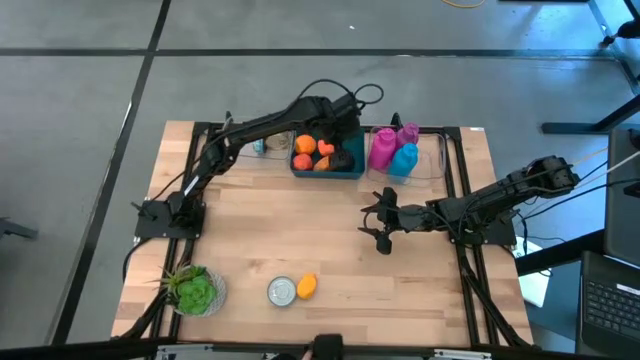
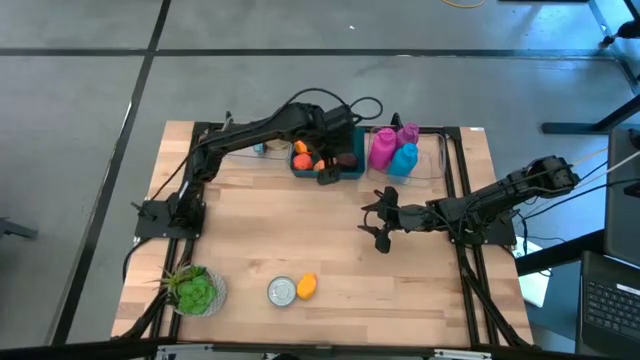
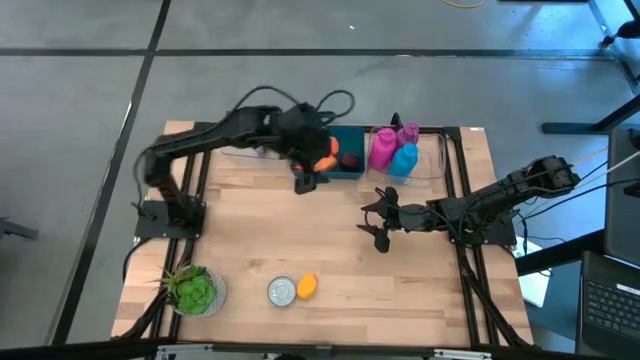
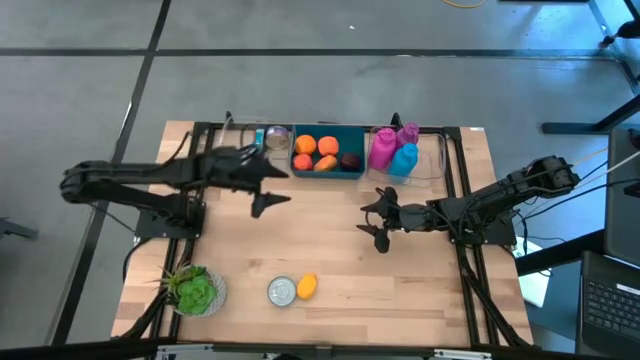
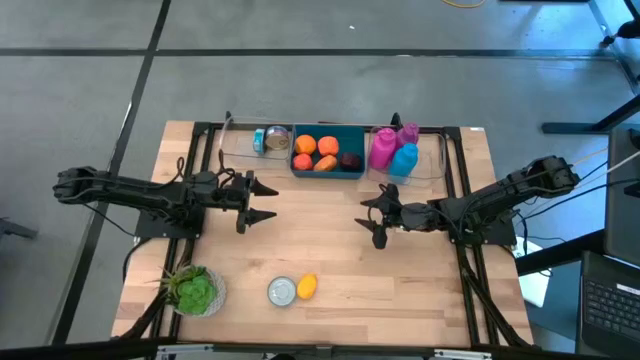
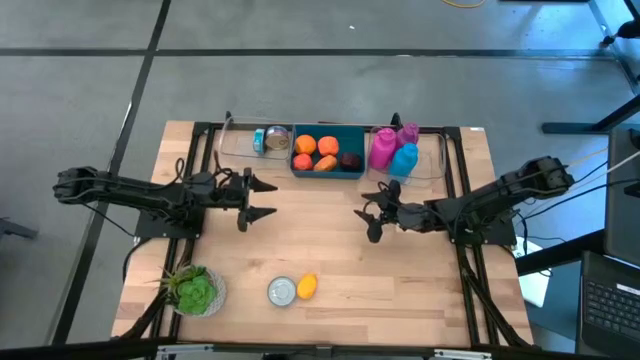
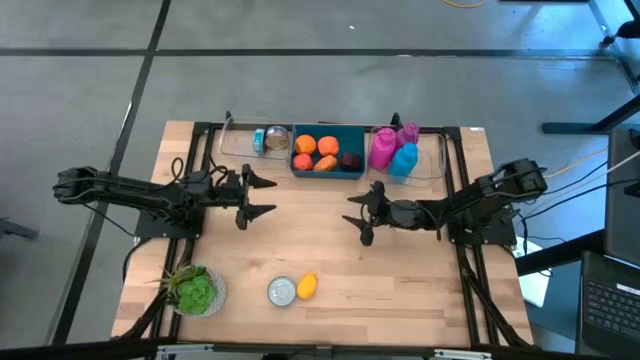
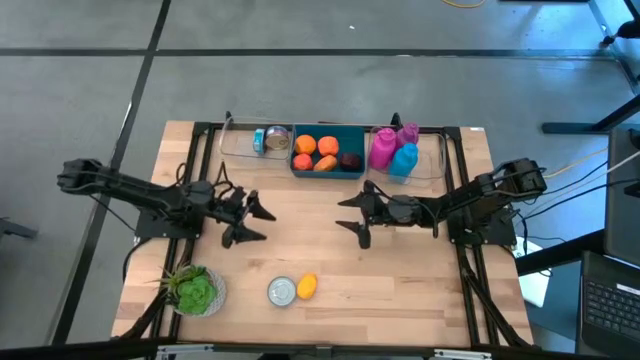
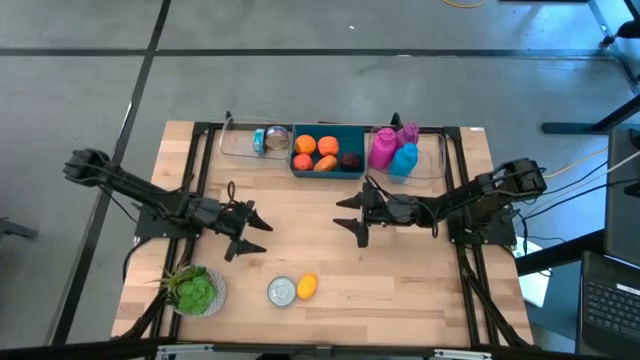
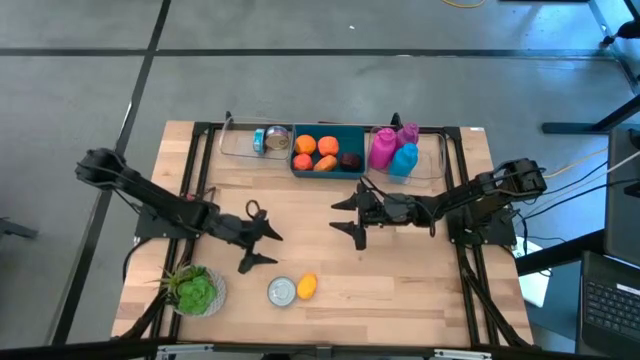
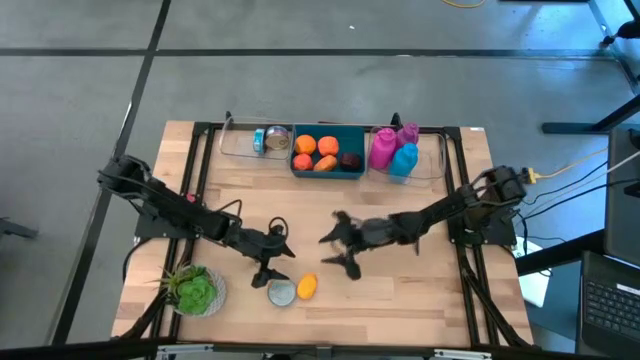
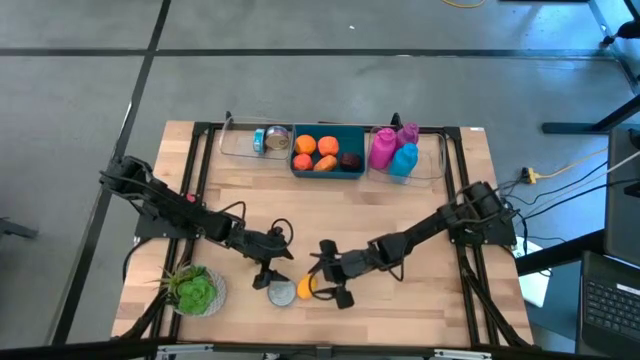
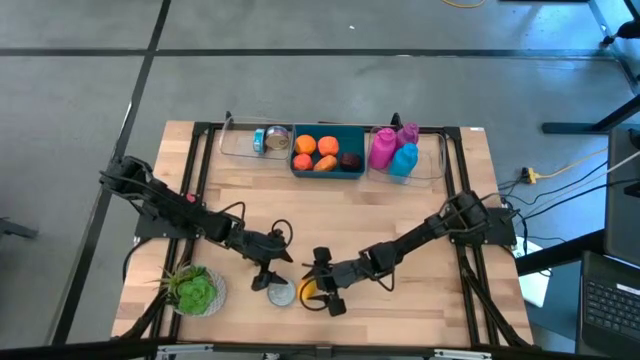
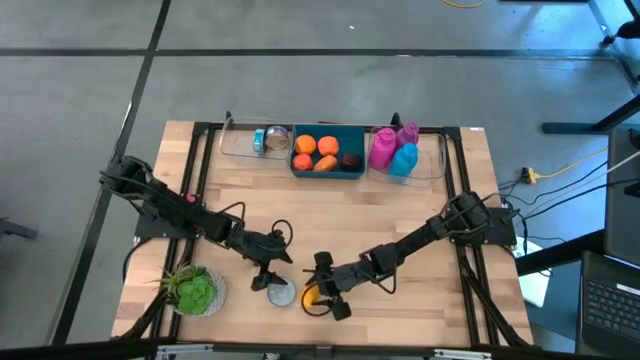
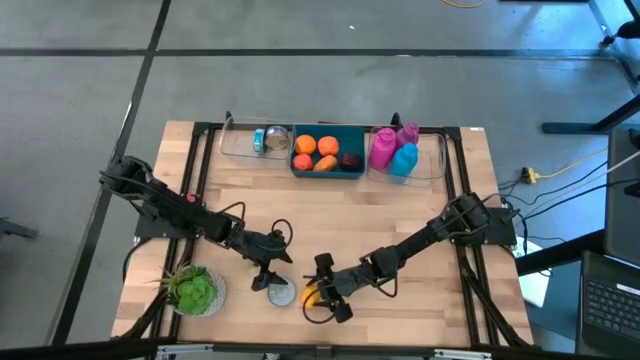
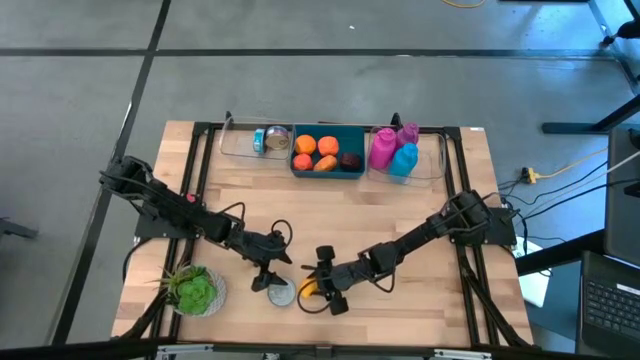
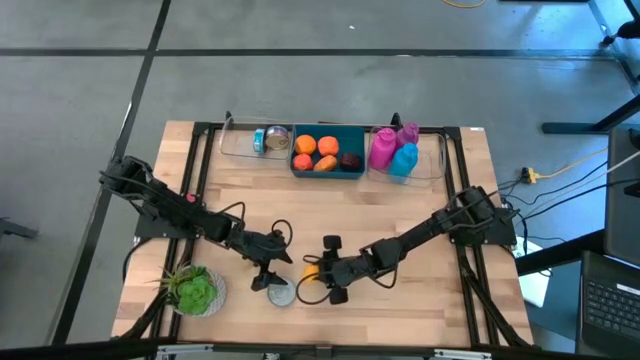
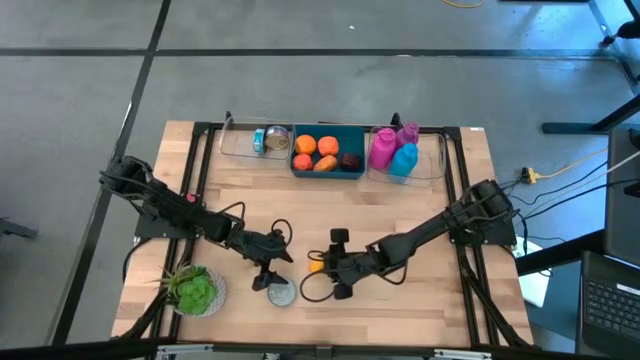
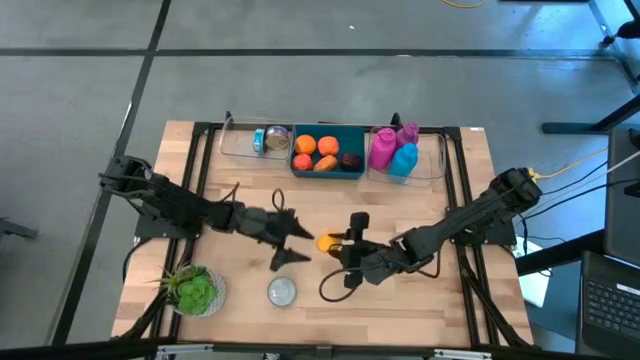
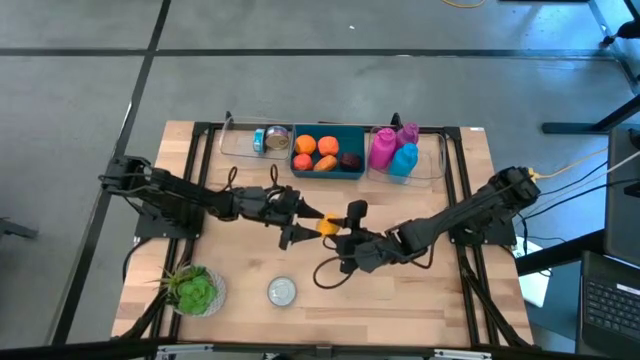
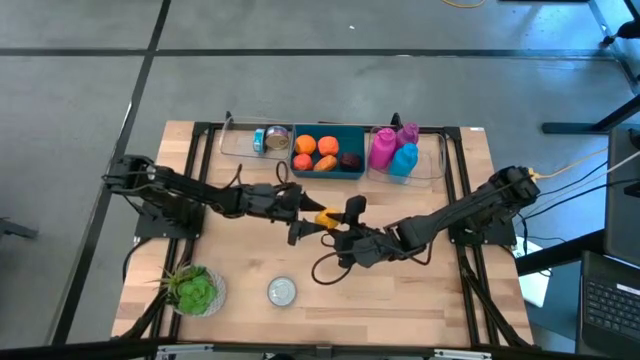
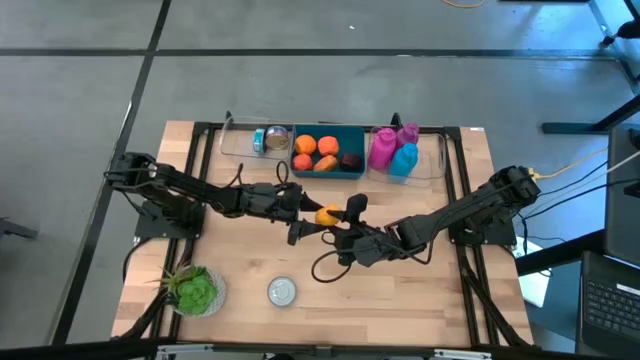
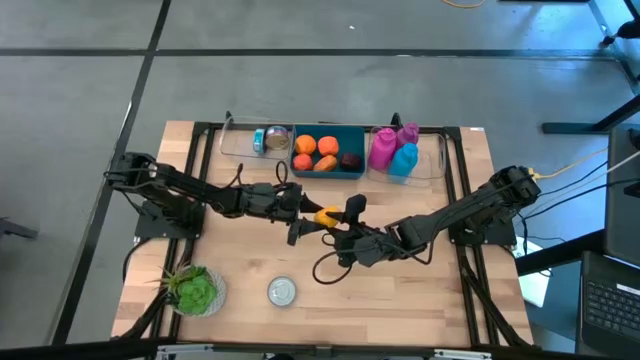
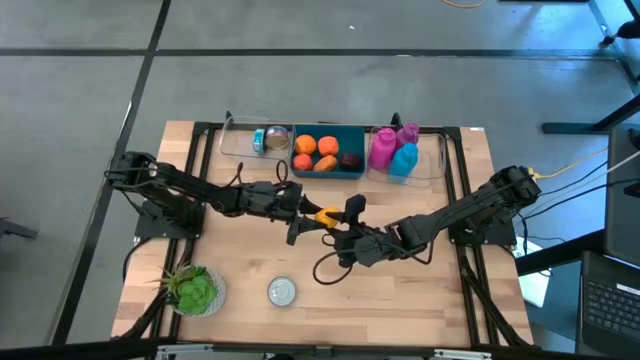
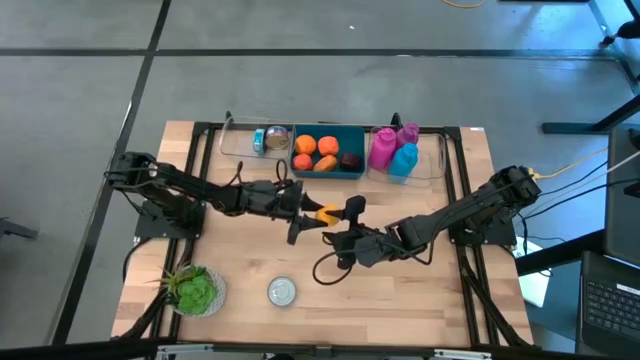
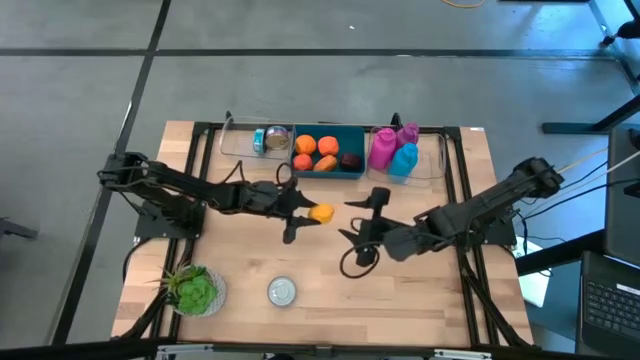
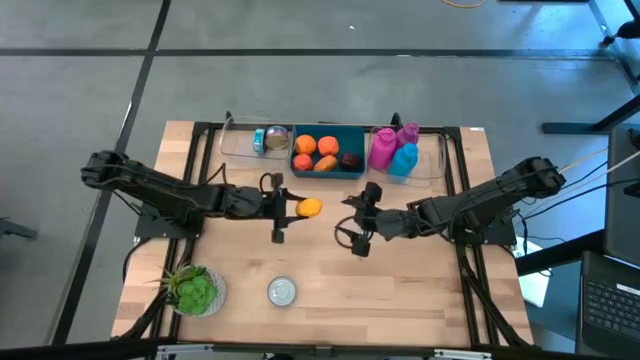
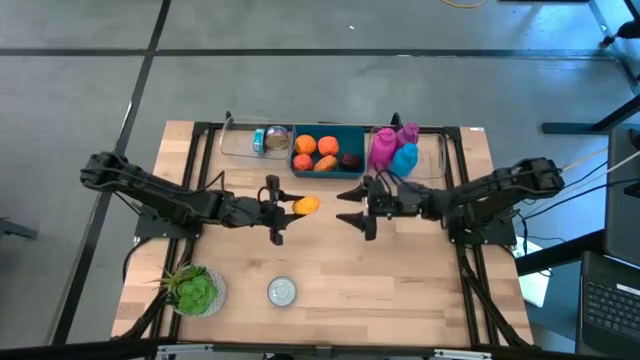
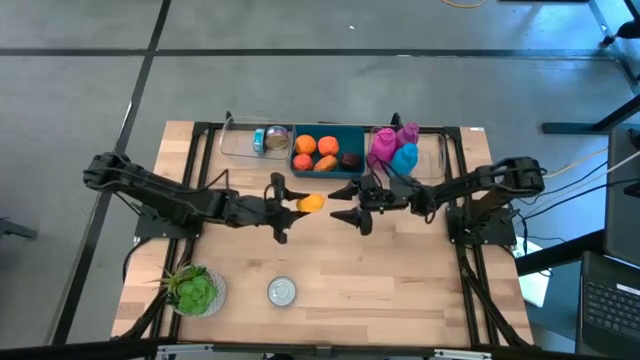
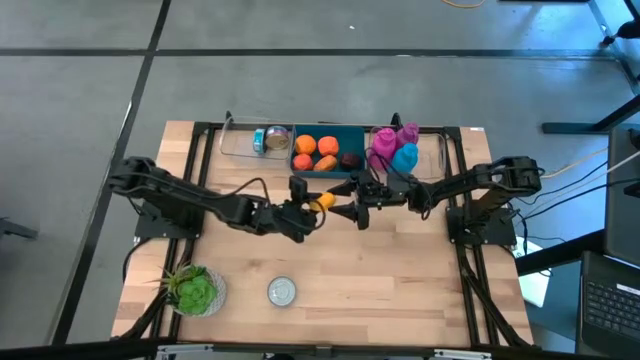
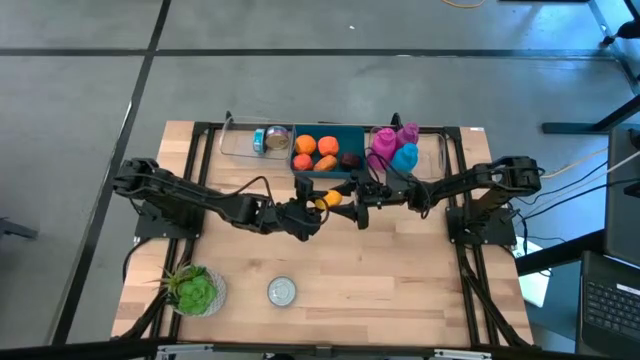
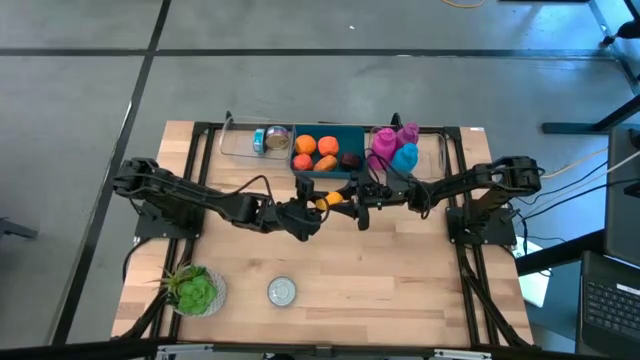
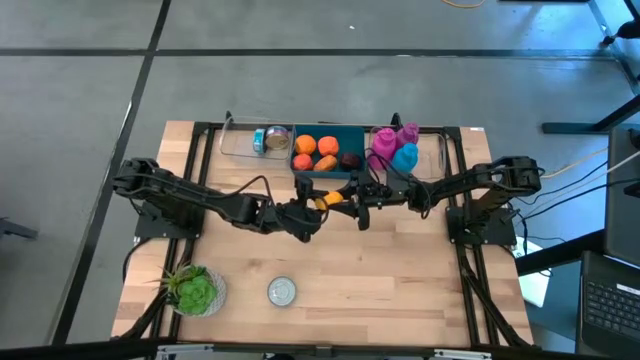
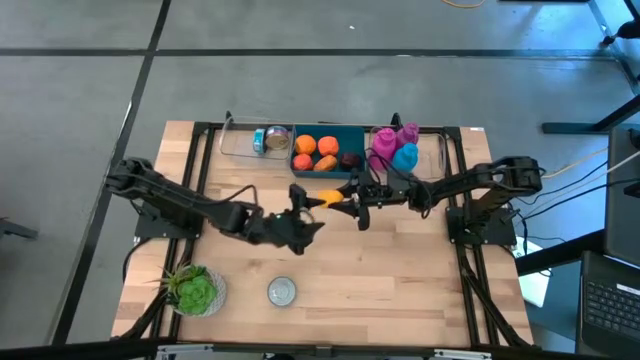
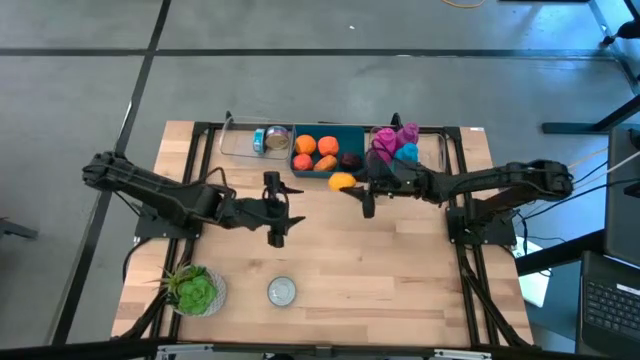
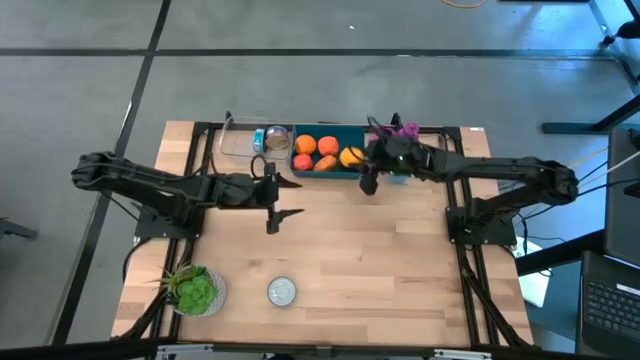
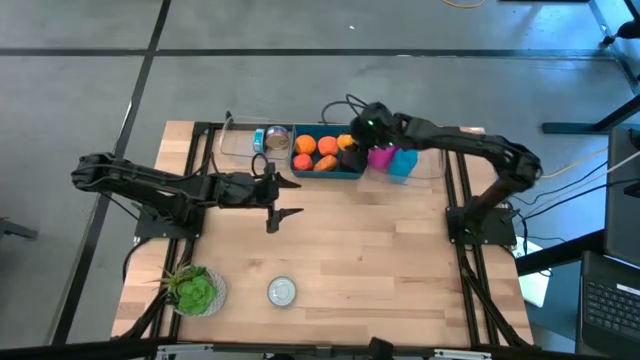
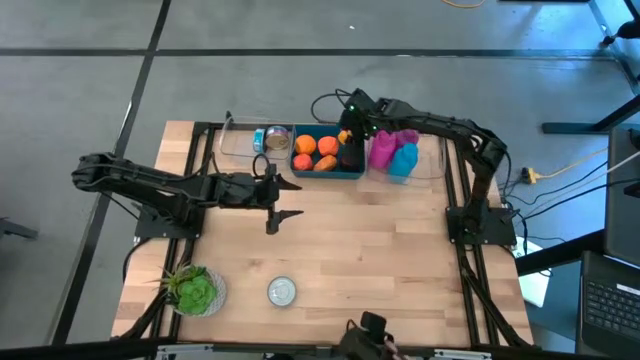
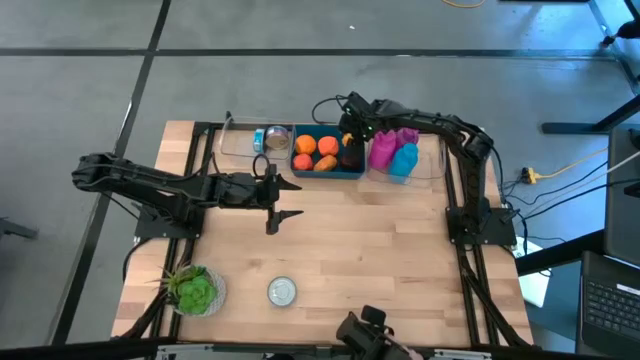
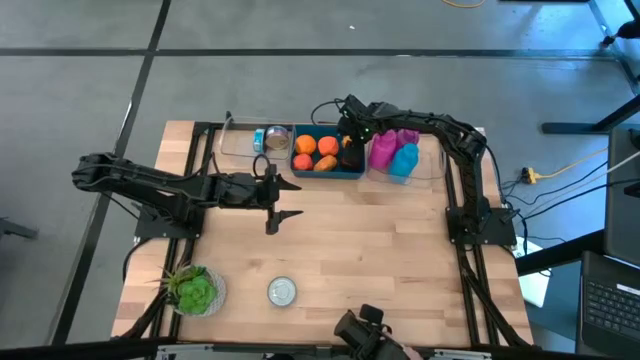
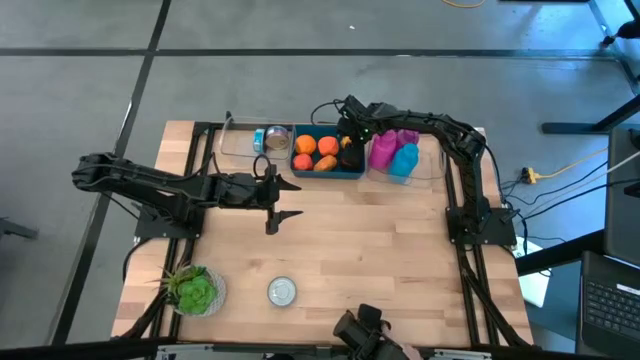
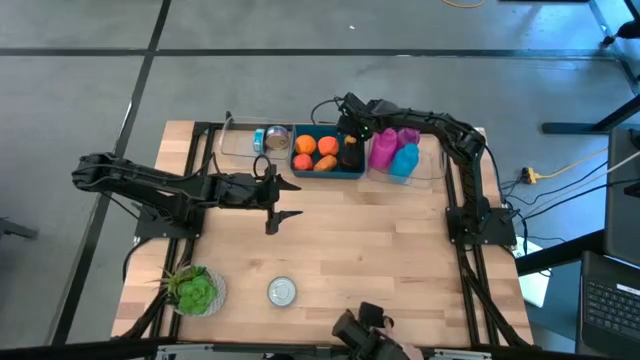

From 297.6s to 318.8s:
Task: Pick & Place Food Item
Put the lemon into the blue bin

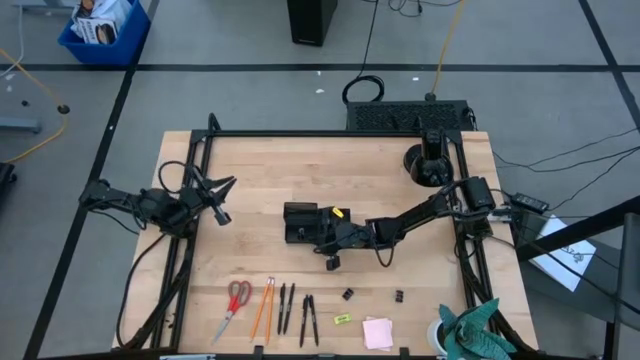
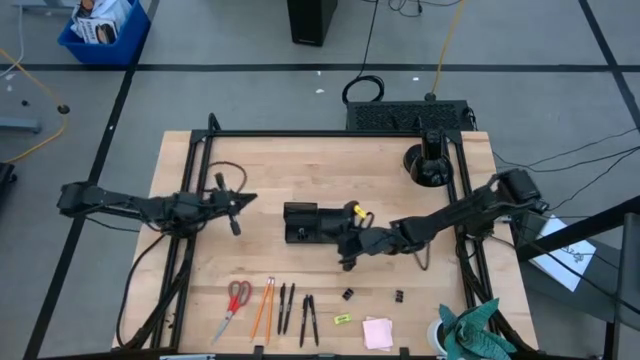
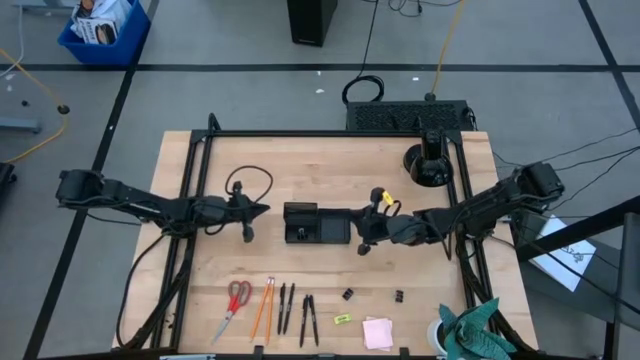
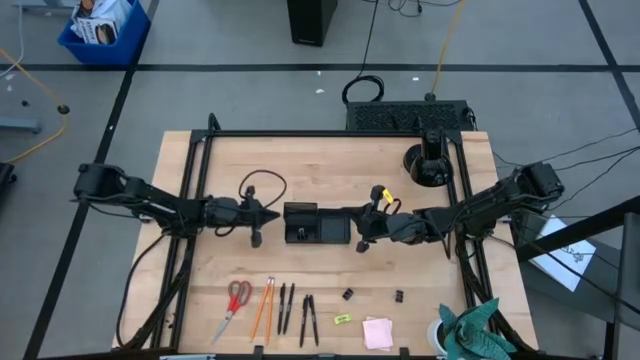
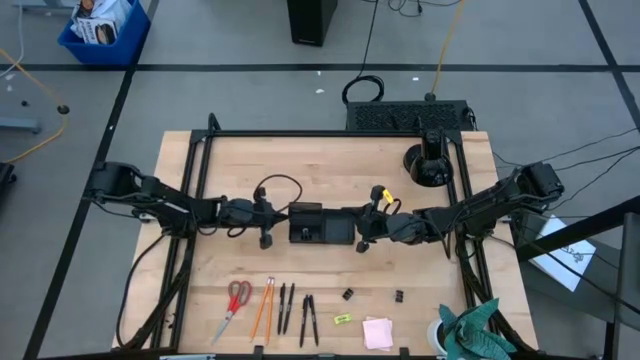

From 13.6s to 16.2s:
Task: Pick and place office supplies into organizer
Adjust the black desk organizer on the table
